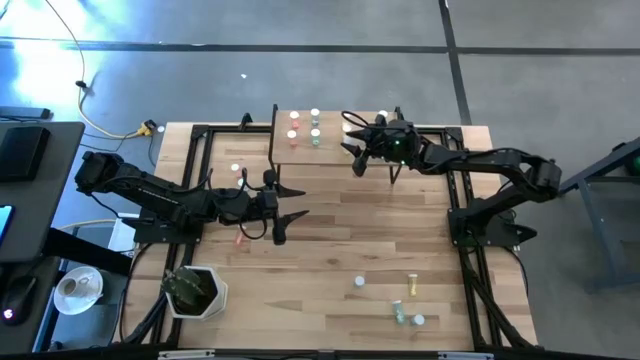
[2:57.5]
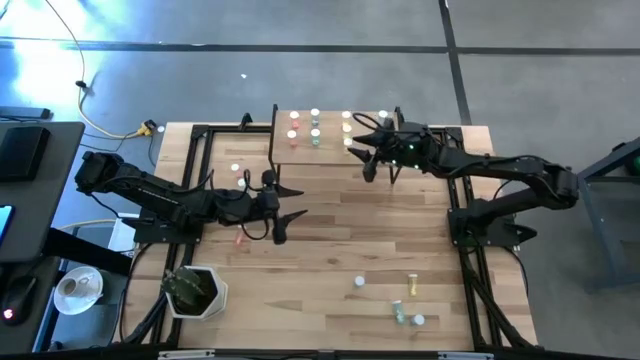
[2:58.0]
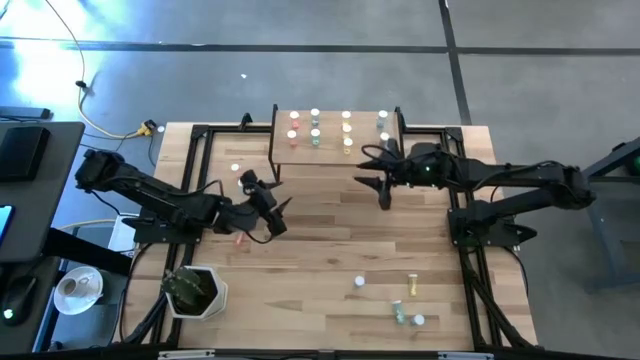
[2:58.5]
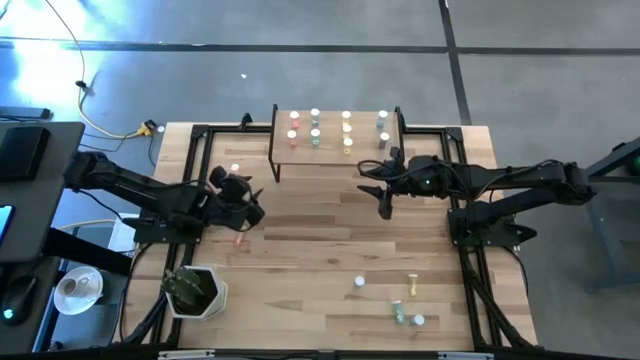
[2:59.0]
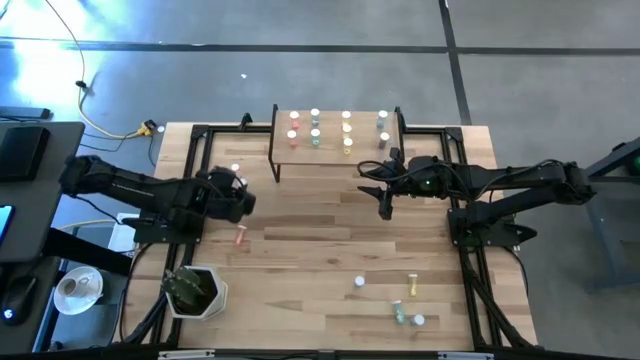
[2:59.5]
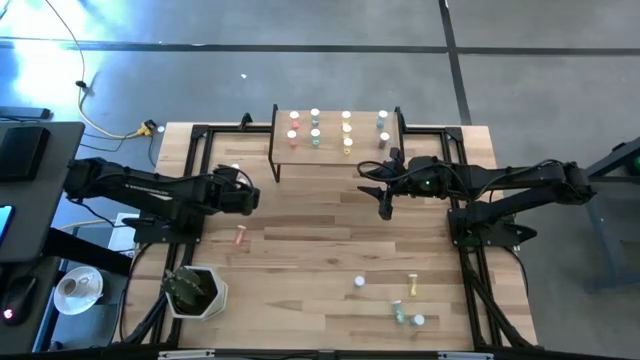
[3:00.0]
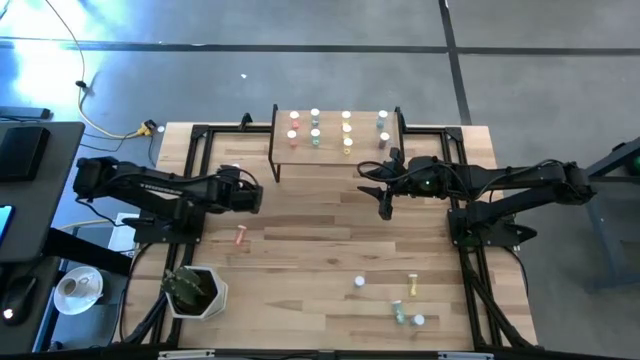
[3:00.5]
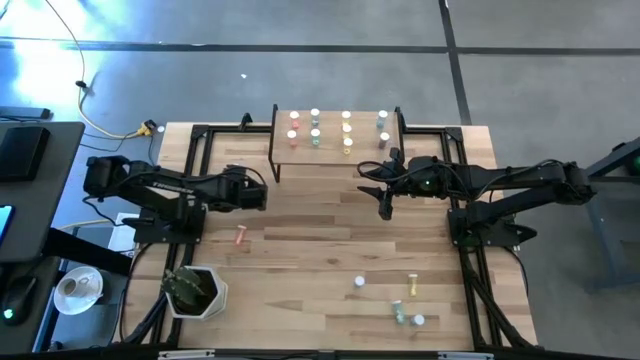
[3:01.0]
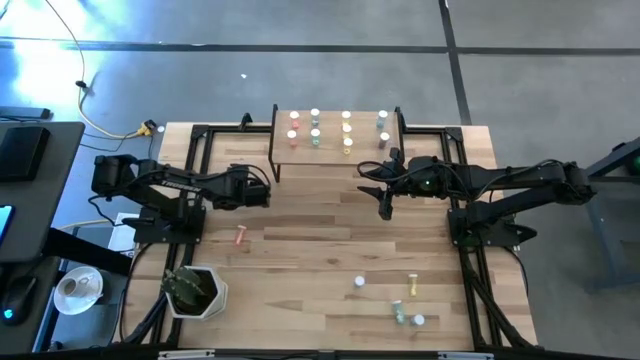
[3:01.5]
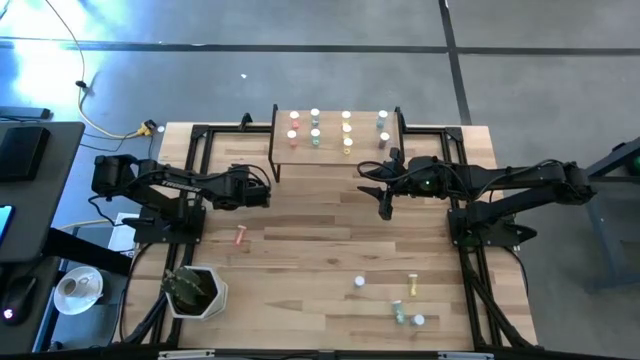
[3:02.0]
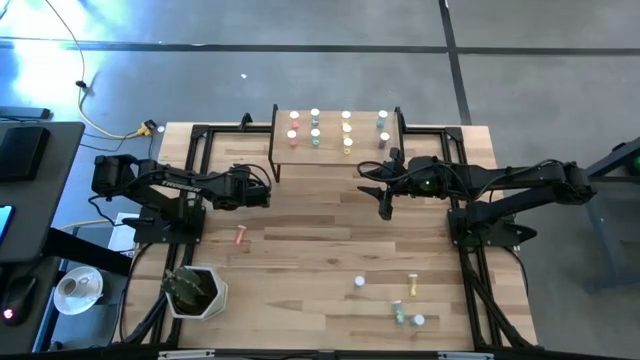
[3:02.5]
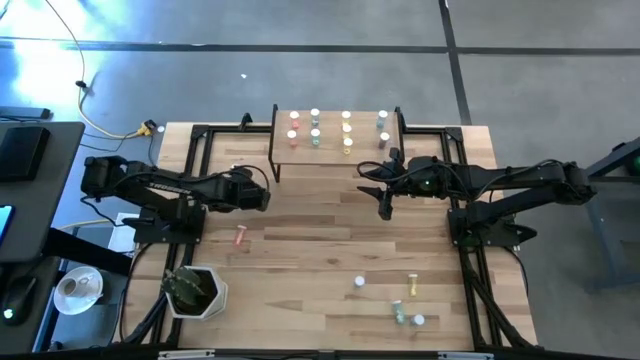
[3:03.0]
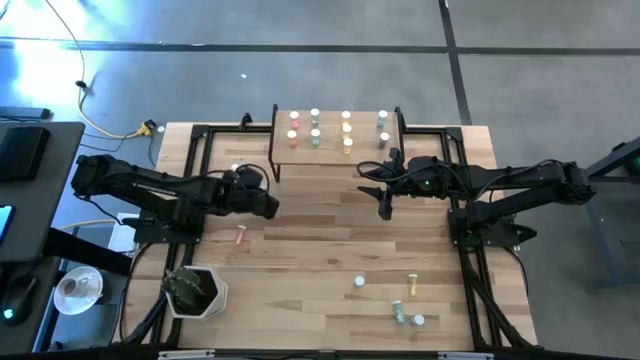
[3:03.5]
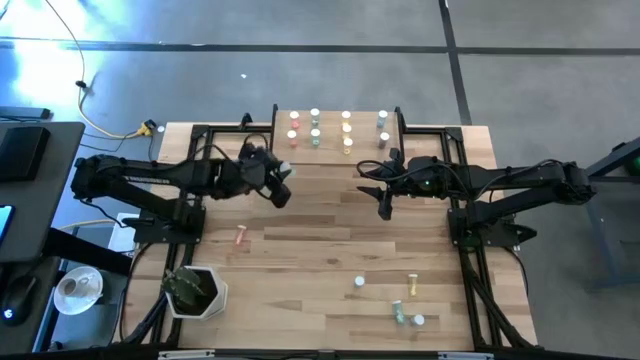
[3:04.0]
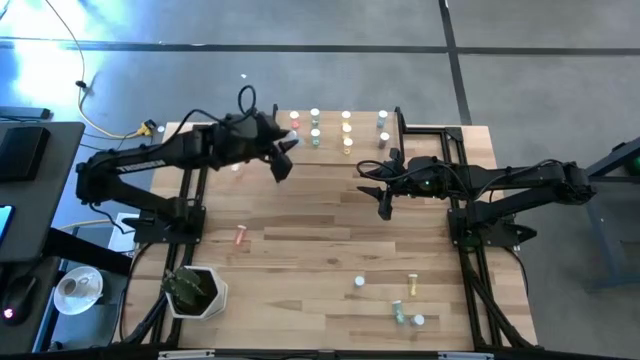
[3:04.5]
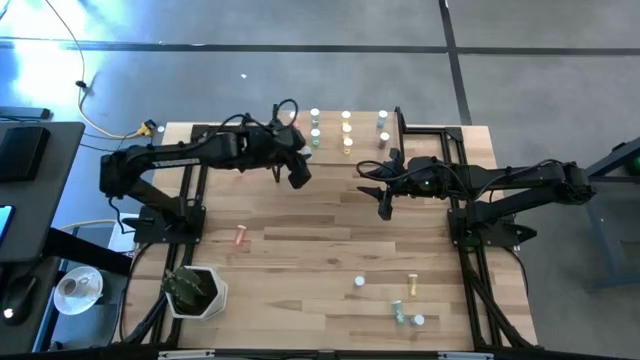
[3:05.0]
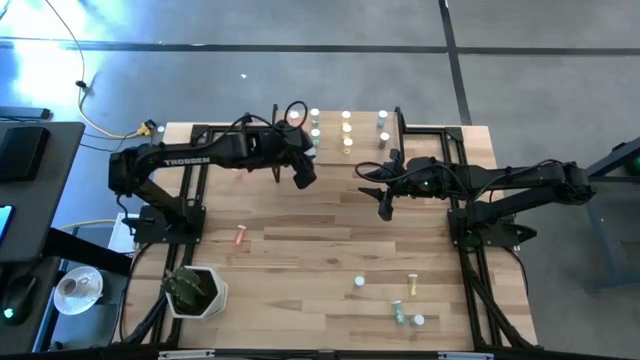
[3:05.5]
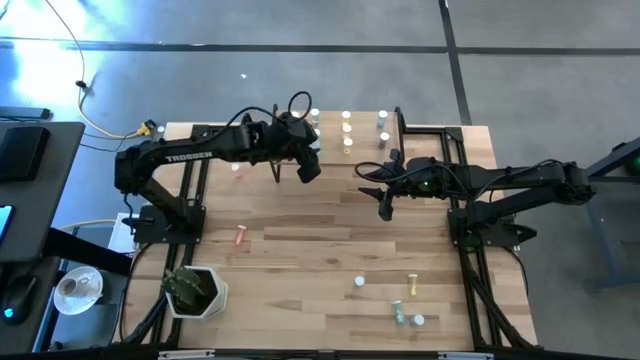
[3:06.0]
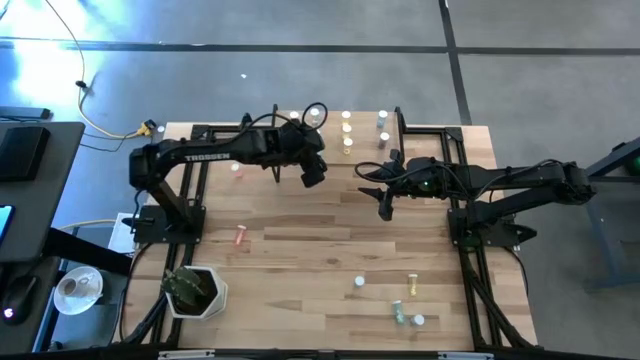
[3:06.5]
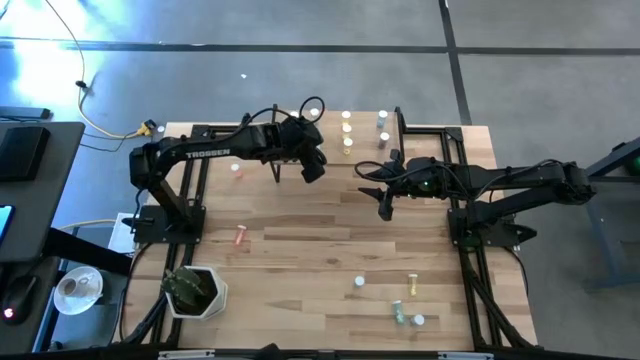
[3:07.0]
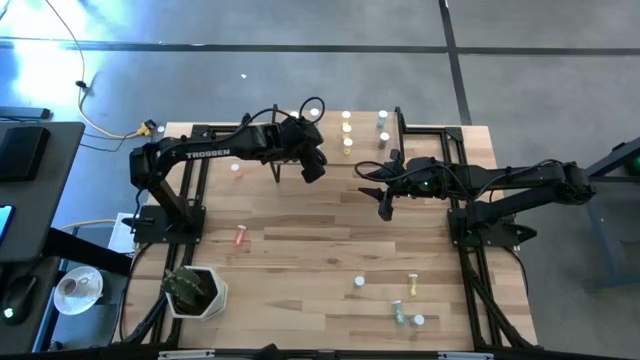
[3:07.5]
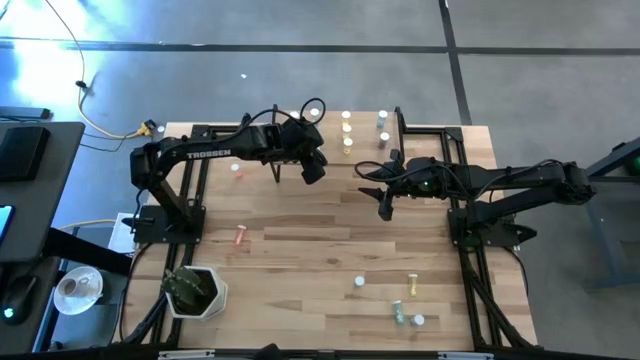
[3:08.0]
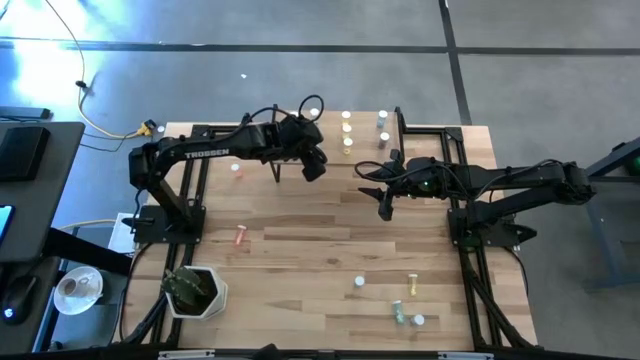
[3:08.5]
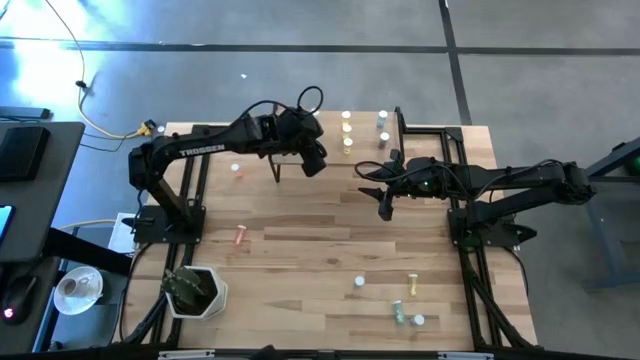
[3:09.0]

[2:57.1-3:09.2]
Task: Pick and place medicine bottles onto shelf by color
Put the light blue medicine bottle on the shelf

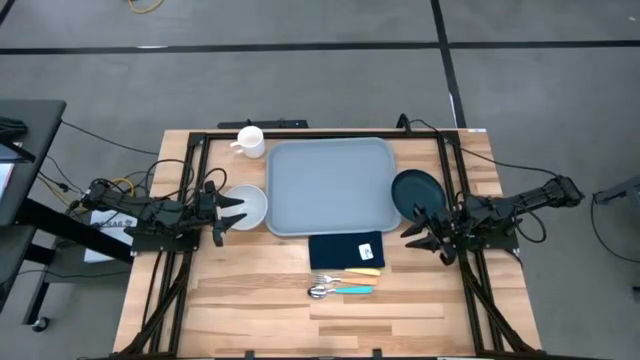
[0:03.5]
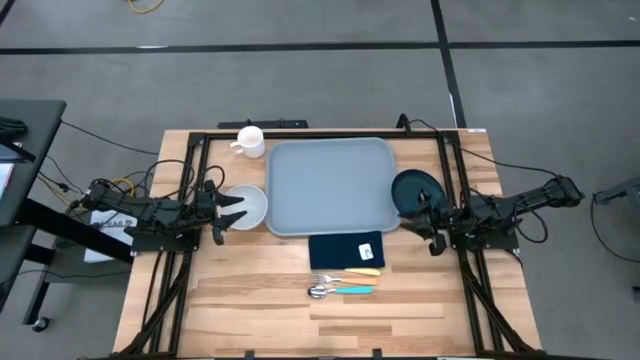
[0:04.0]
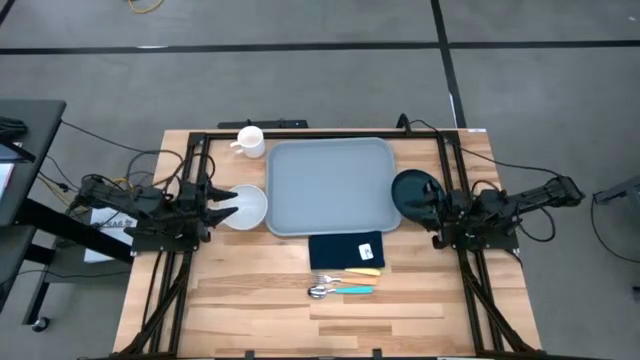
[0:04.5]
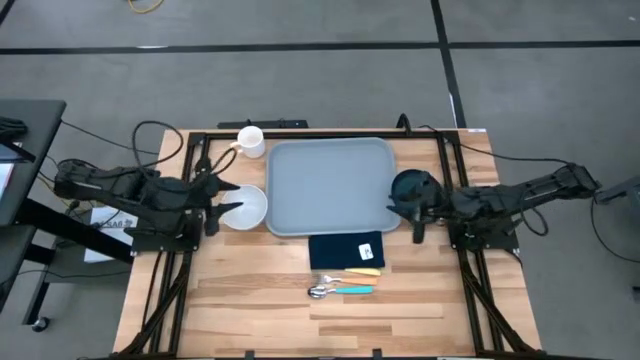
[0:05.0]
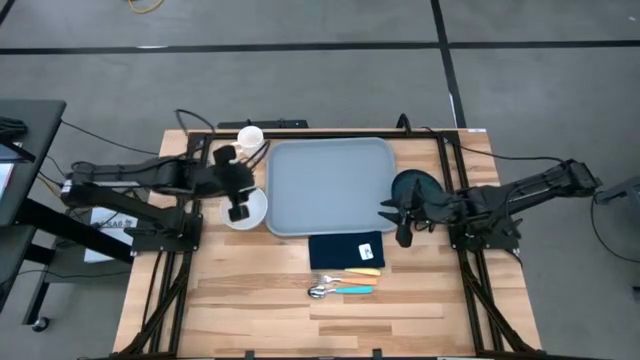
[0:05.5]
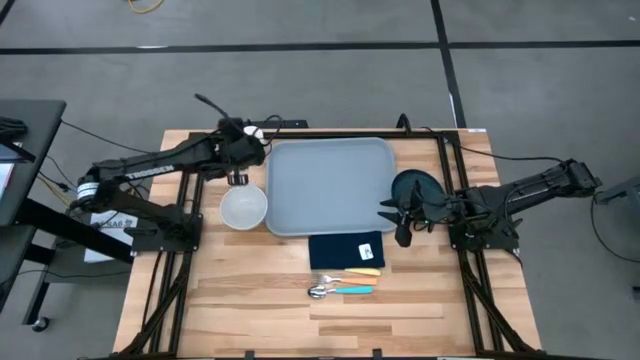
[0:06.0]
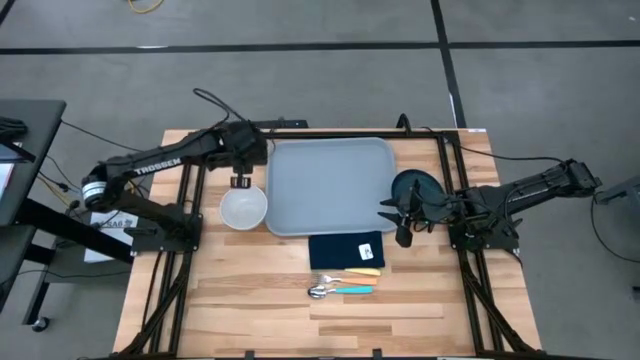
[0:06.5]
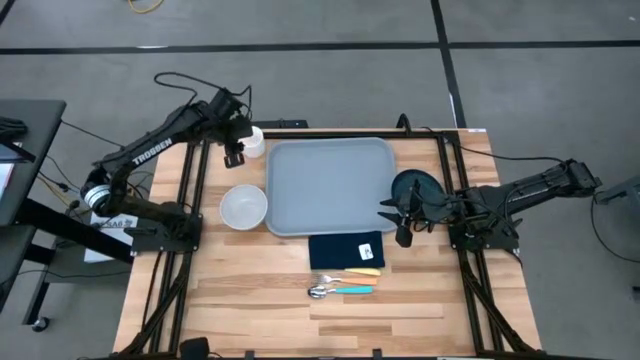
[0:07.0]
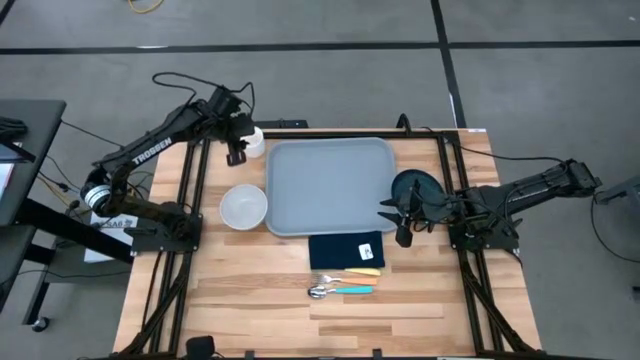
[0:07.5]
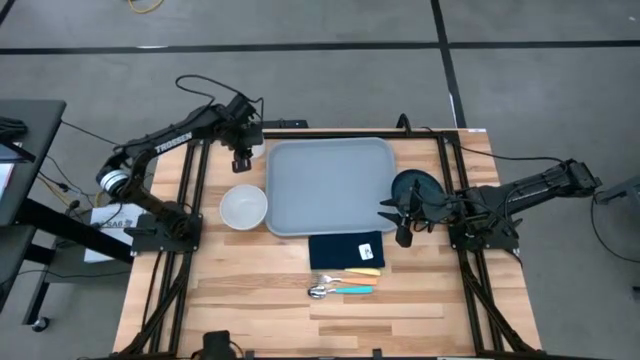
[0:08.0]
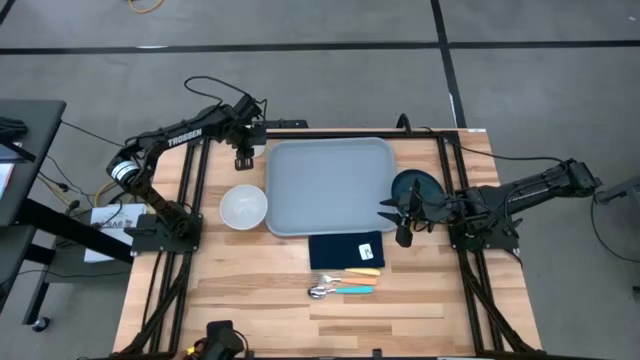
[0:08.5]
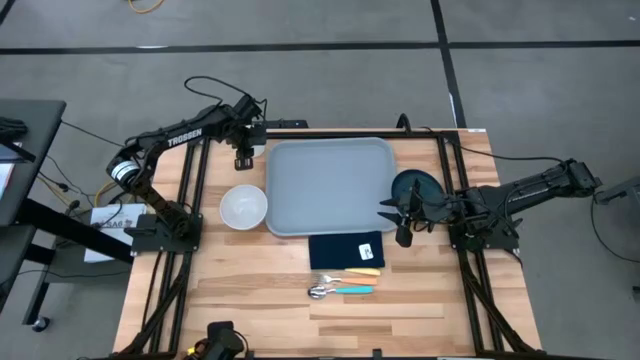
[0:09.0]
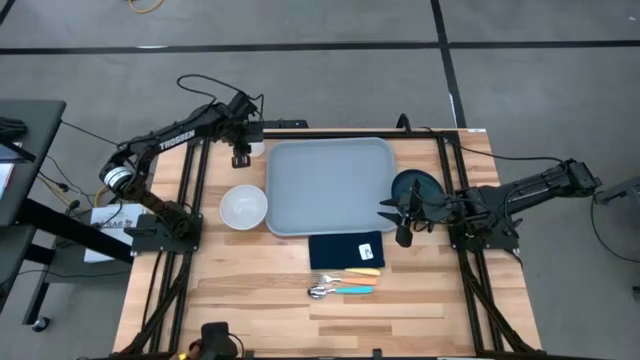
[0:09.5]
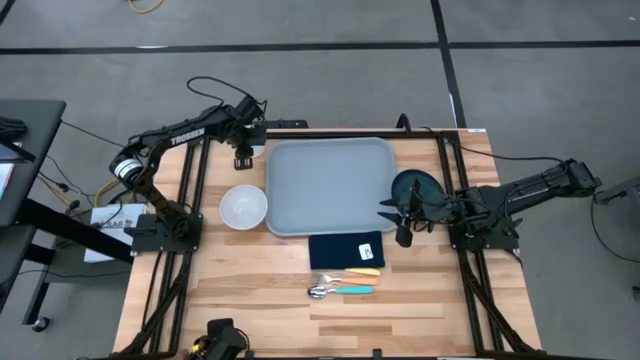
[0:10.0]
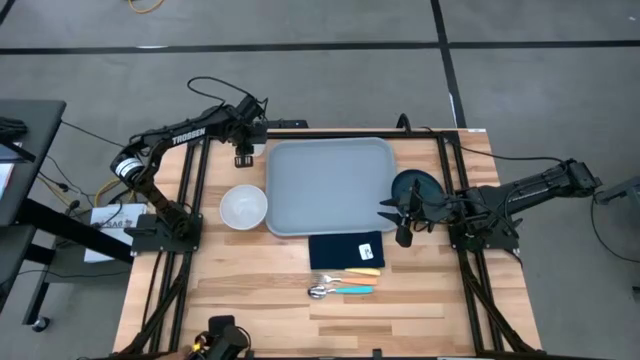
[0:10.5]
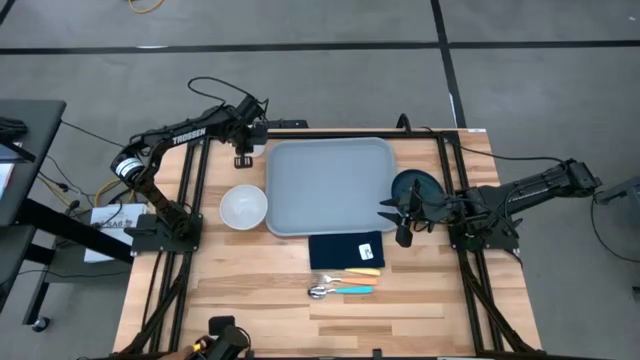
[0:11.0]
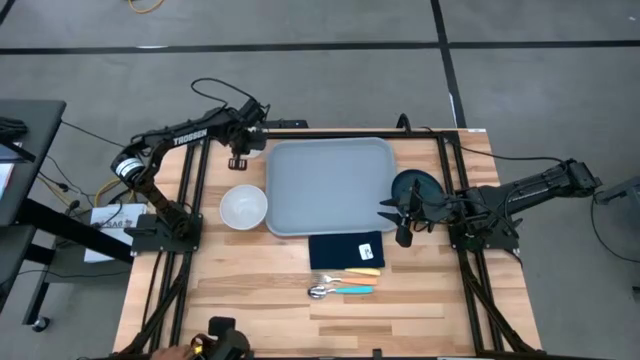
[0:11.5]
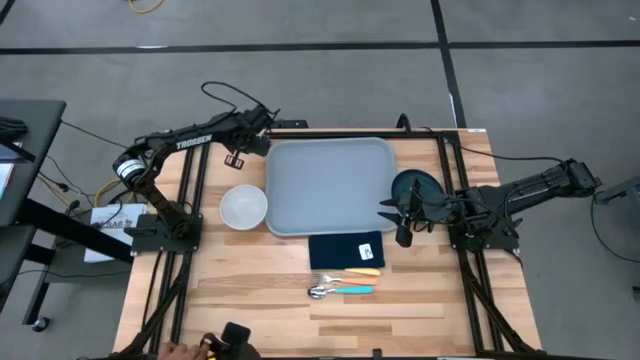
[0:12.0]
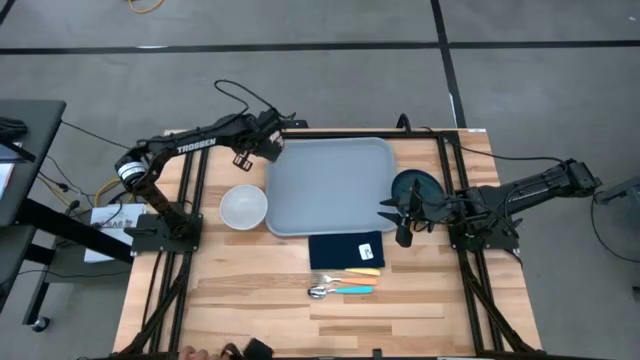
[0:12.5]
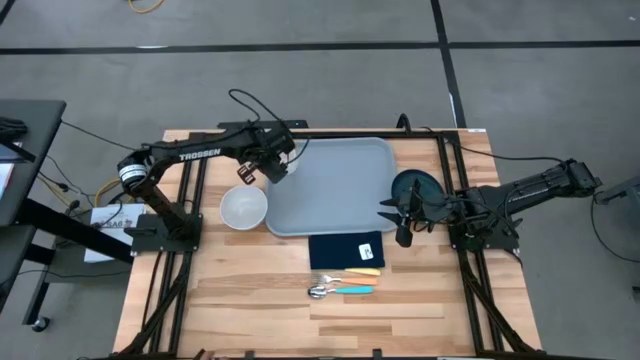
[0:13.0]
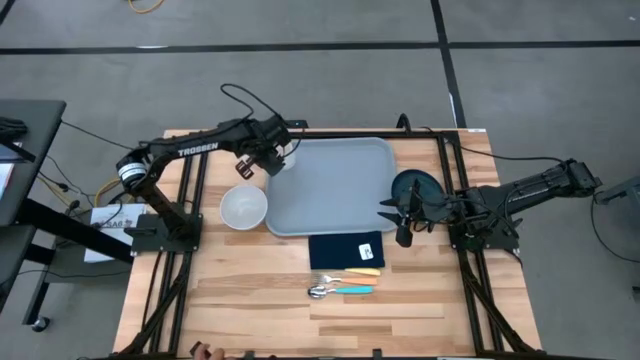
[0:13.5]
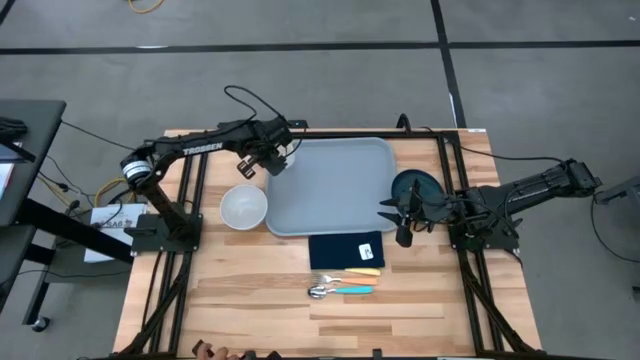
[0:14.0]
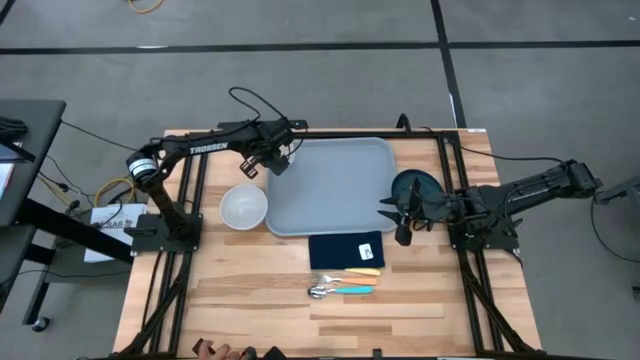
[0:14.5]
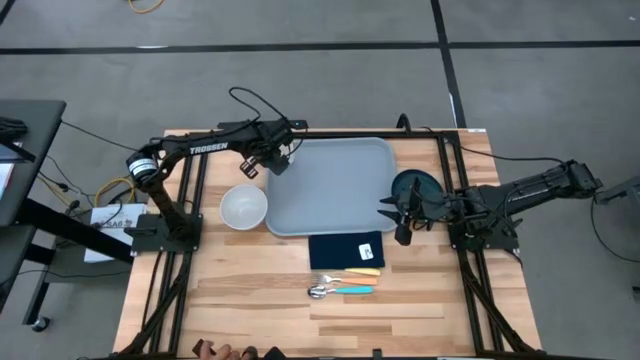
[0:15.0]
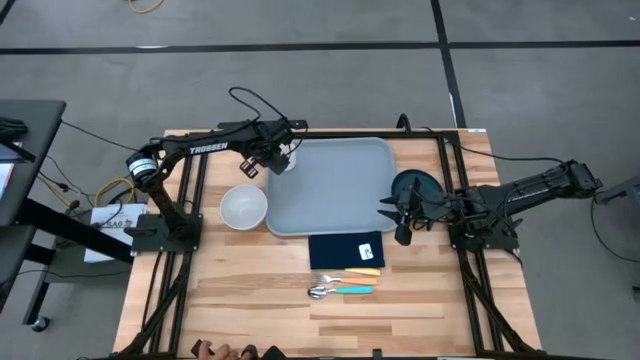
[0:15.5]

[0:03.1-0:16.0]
Task: Set up tray
Put the white mug on the gray serving tray
